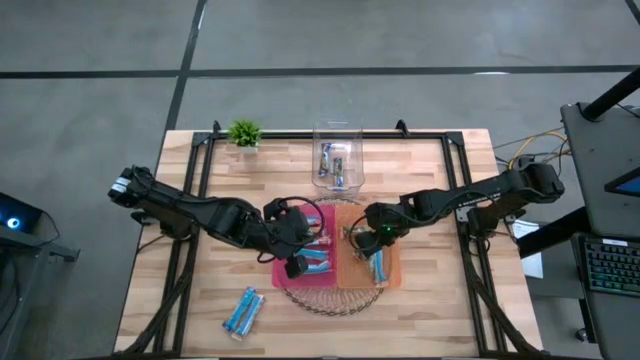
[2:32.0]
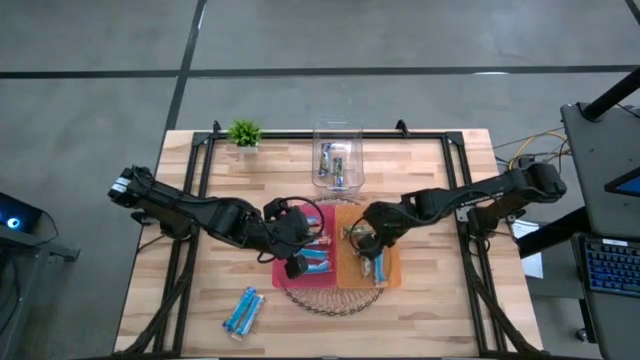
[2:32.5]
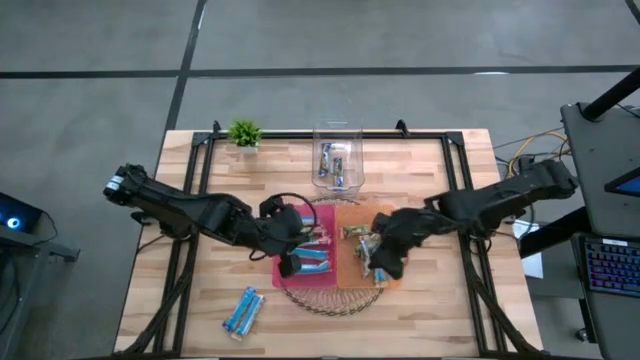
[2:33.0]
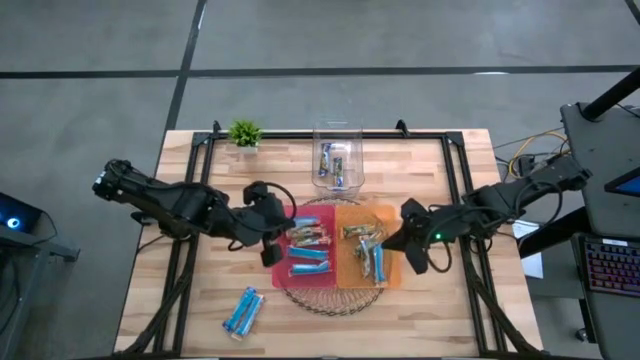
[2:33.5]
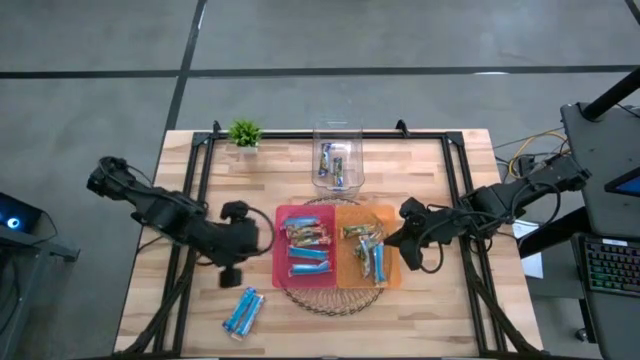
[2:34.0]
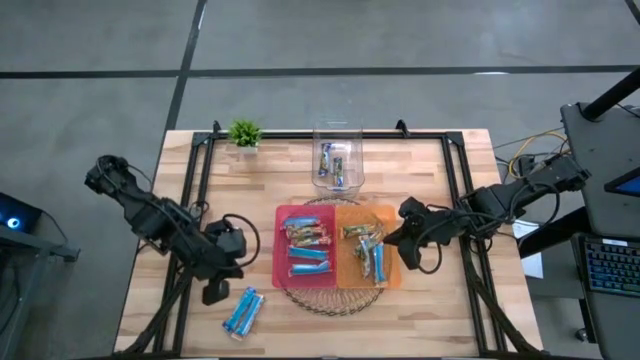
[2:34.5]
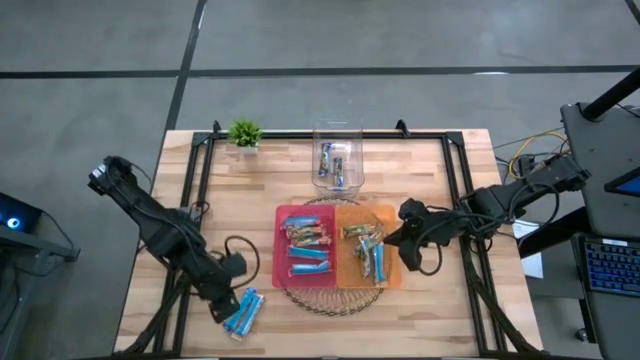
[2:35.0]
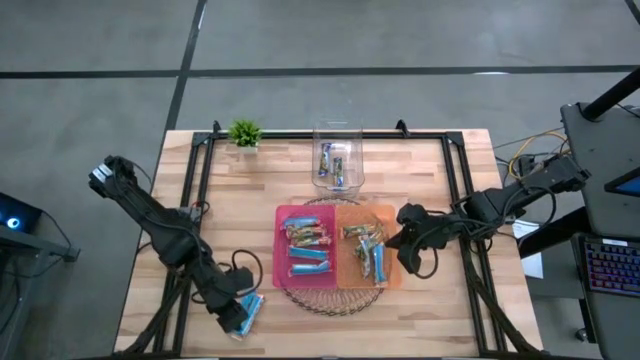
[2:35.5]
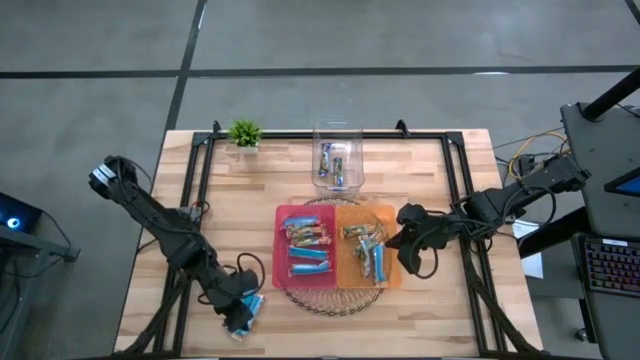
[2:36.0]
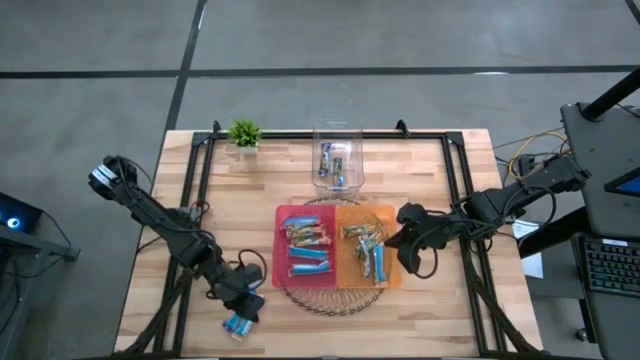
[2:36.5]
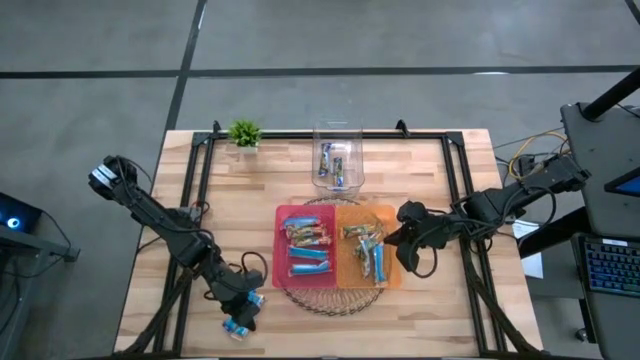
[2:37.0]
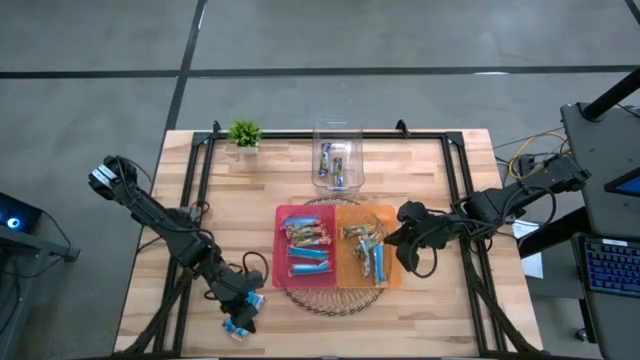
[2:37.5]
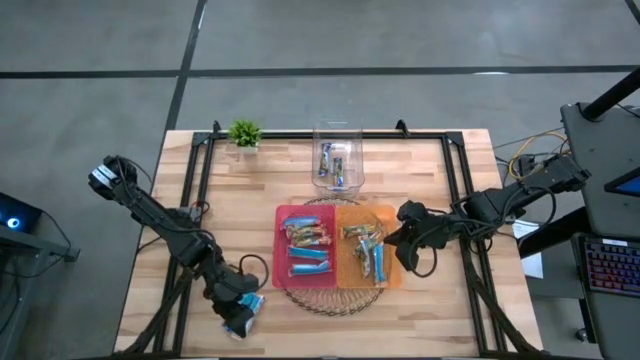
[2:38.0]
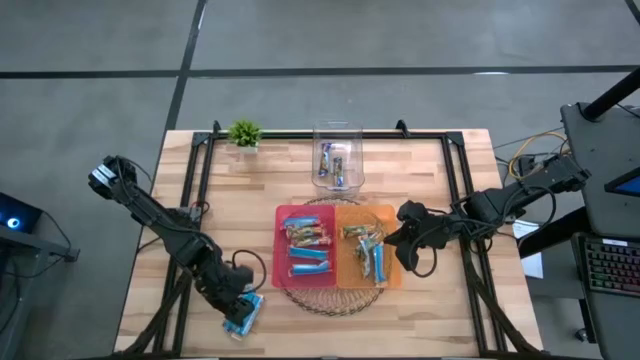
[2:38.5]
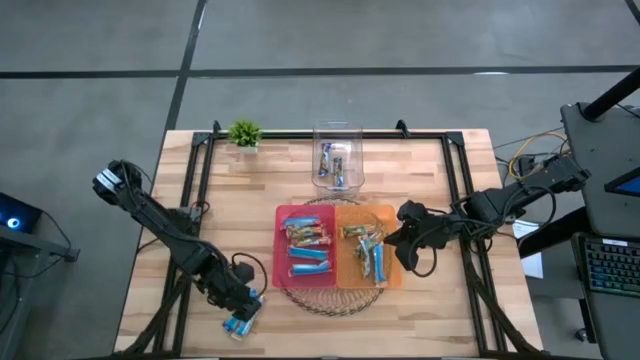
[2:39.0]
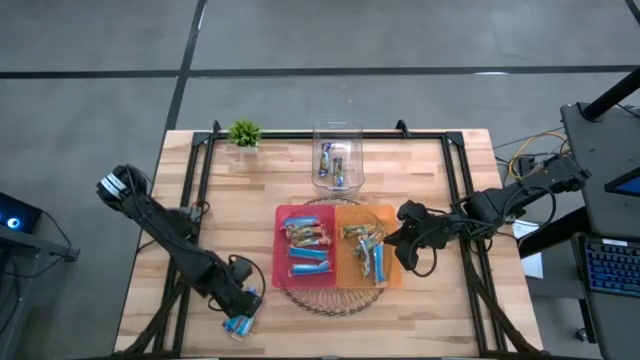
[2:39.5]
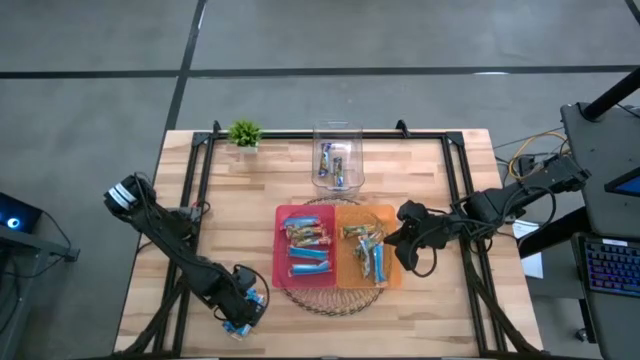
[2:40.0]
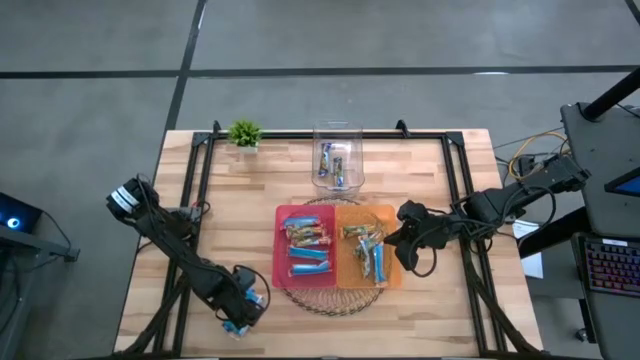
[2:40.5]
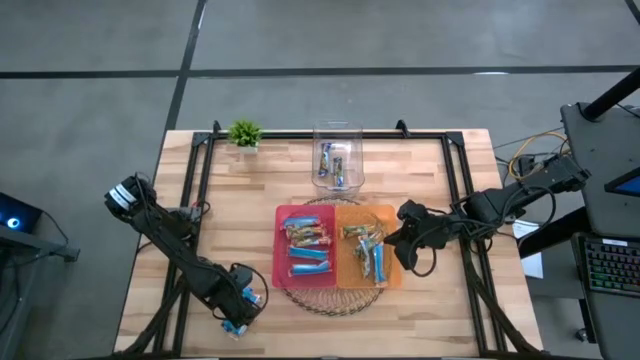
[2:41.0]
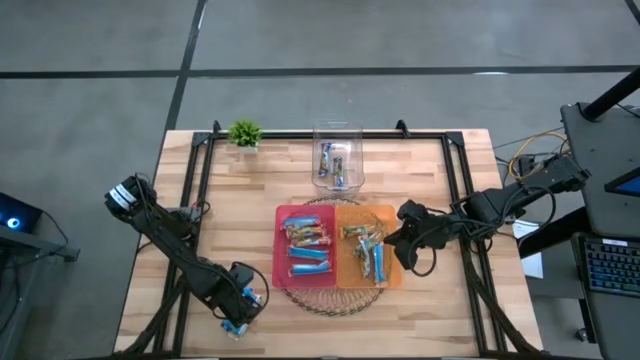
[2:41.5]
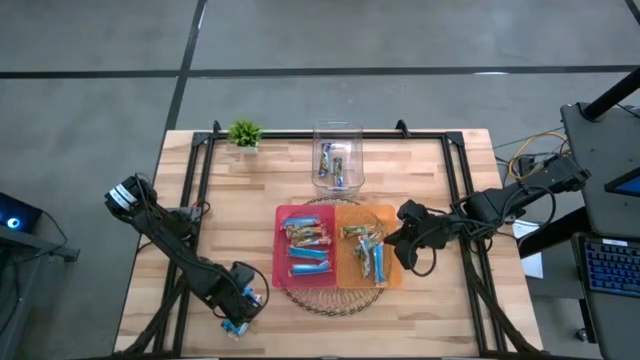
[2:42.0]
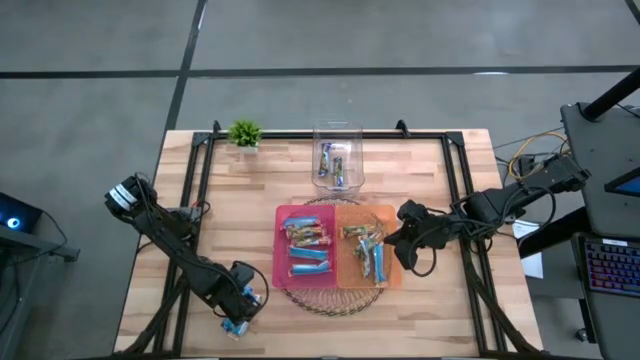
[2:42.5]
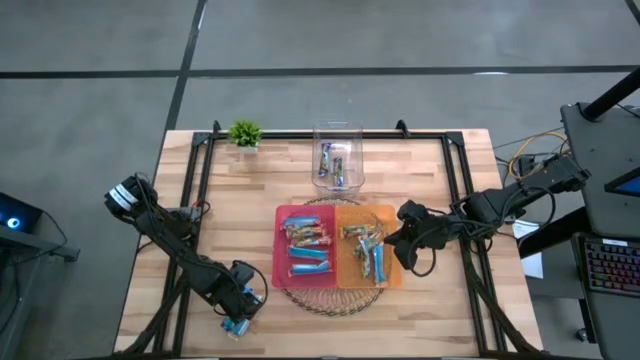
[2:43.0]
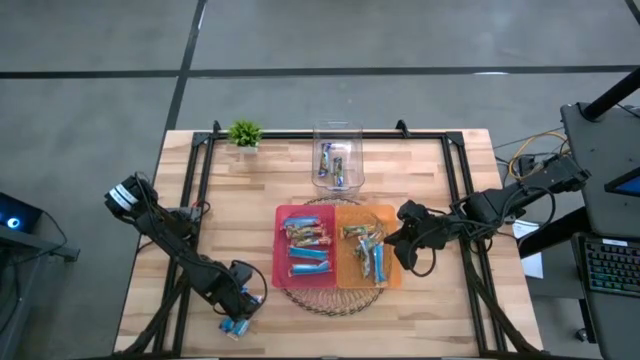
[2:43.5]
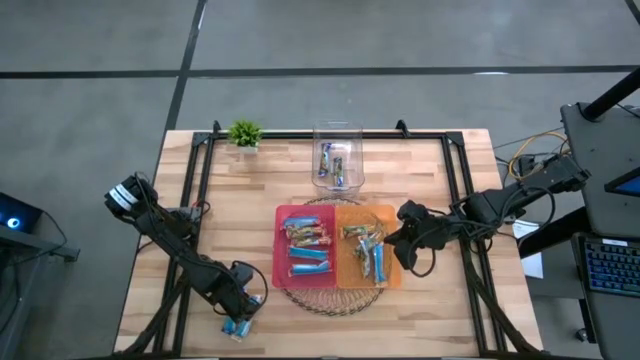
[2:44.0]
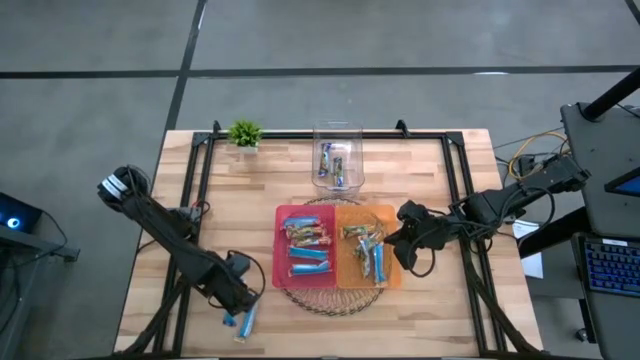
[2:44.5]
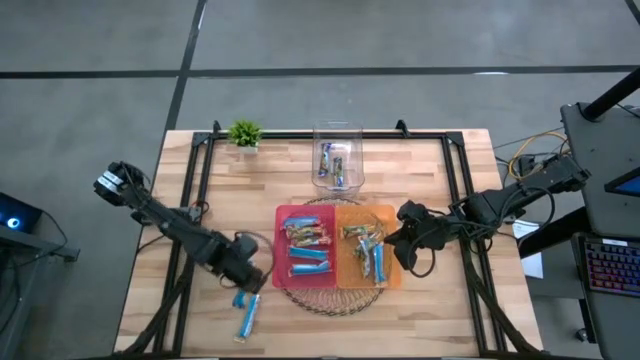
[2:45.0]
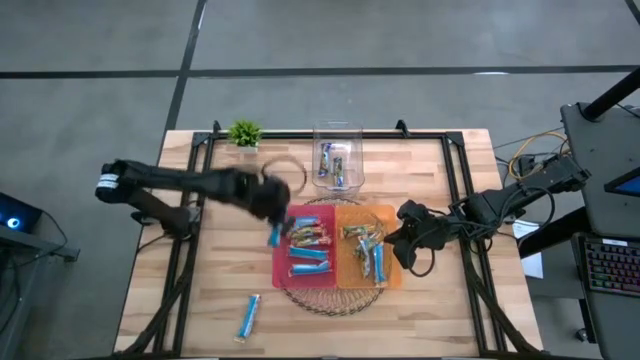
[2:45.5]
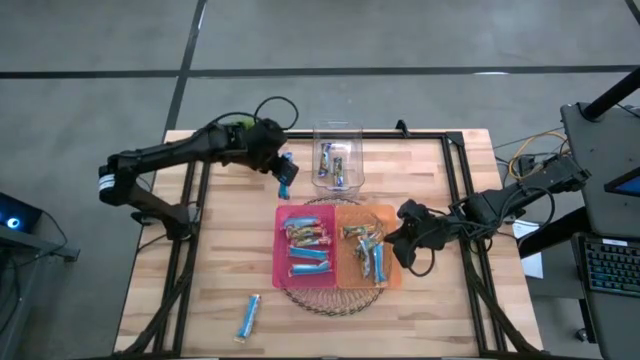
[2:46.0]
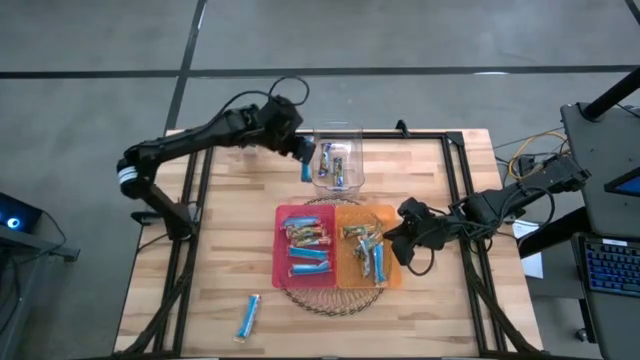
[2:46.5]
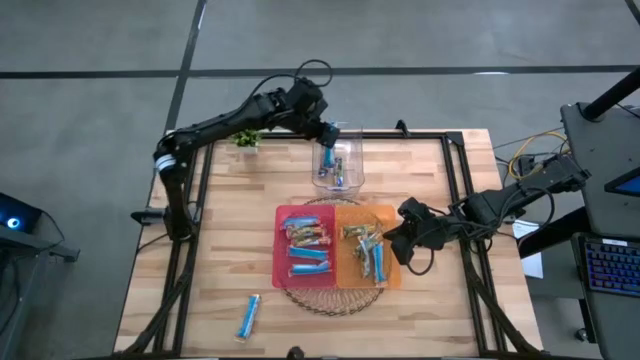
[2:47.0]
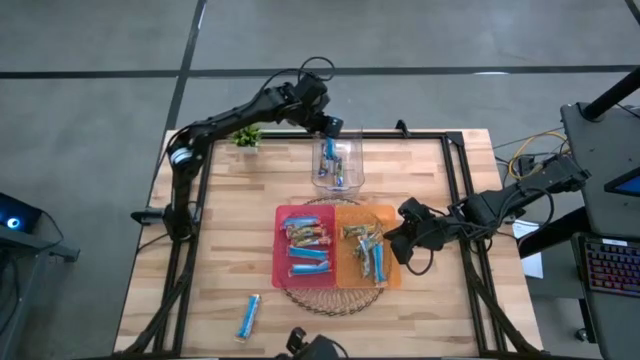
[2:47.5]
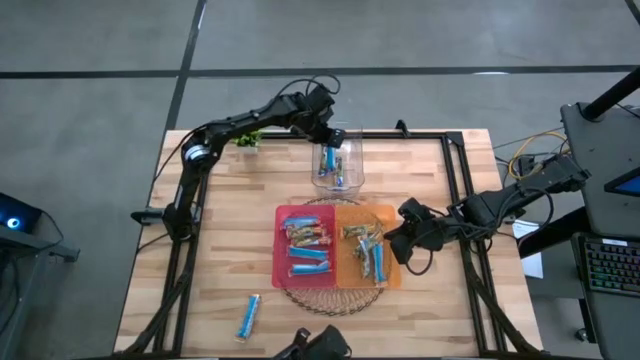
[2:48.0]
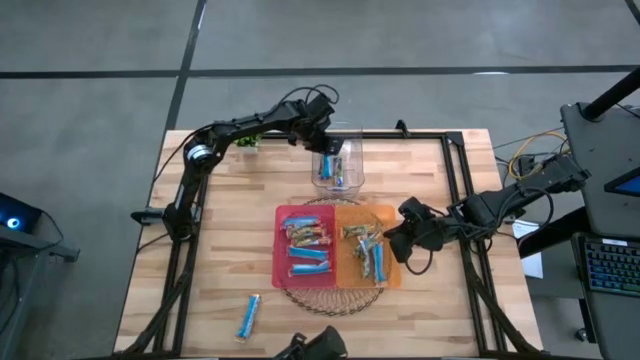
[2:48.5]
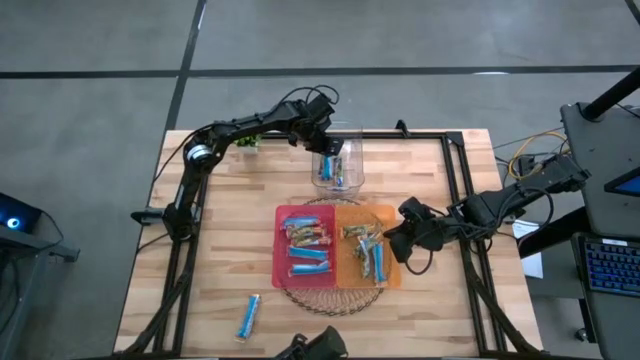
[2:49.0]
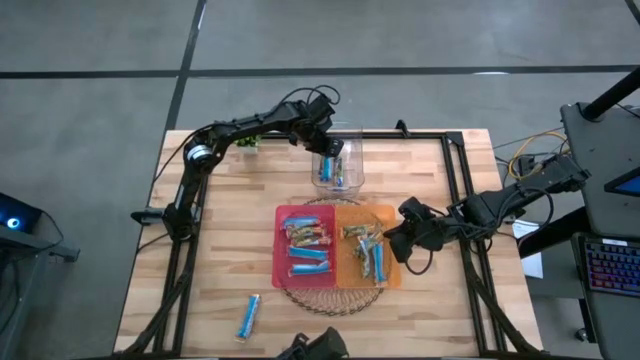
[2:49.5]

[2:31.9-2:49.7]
Task: Pick and place Granola Bars by type
Put the blue granola bar into the transparent bin

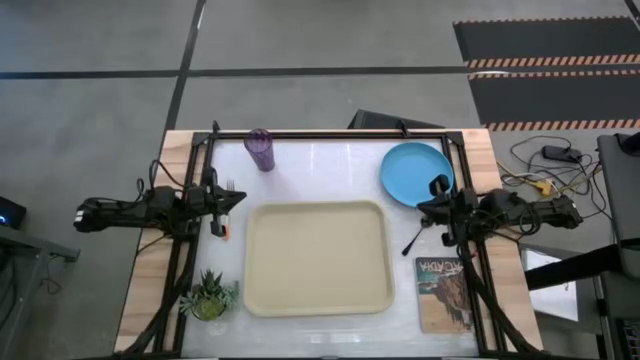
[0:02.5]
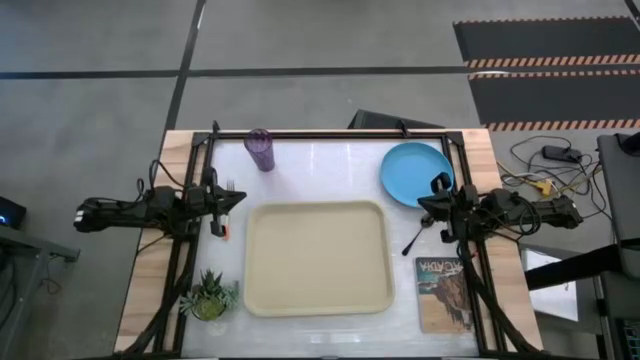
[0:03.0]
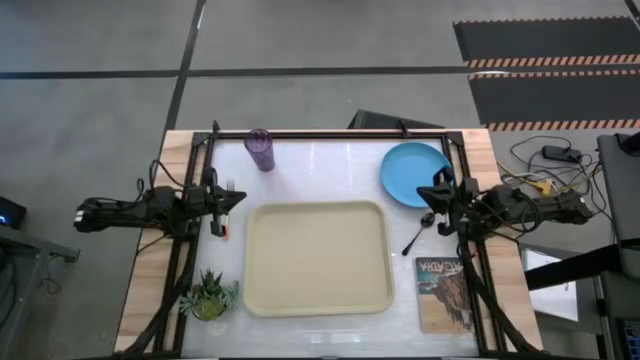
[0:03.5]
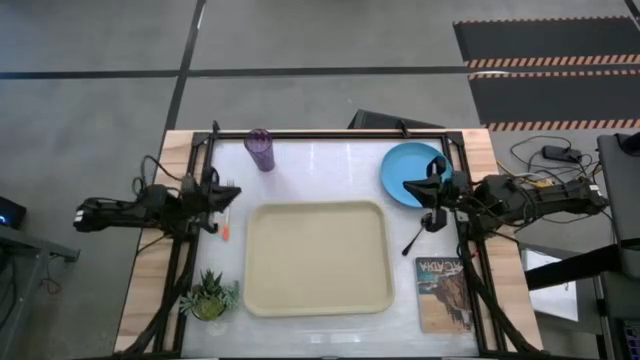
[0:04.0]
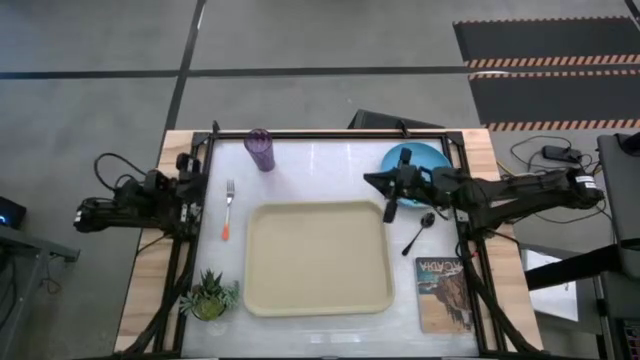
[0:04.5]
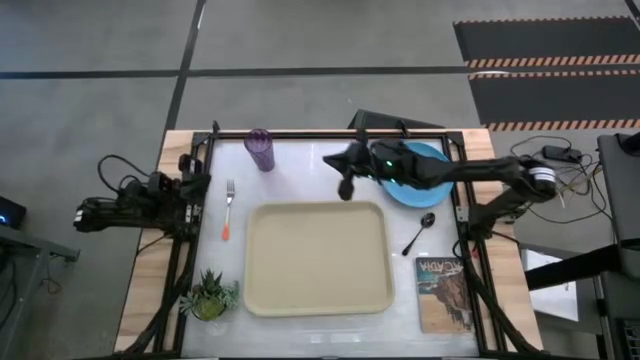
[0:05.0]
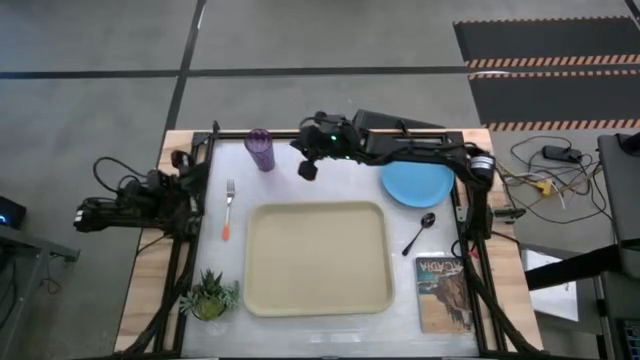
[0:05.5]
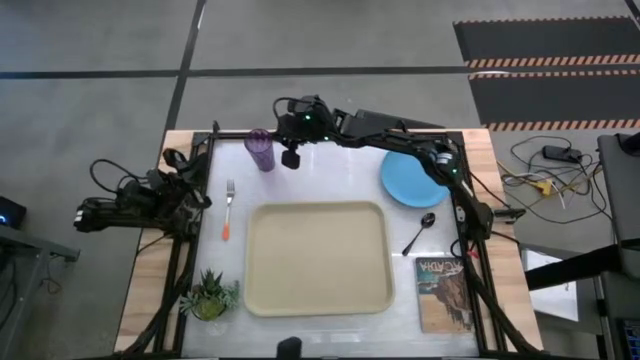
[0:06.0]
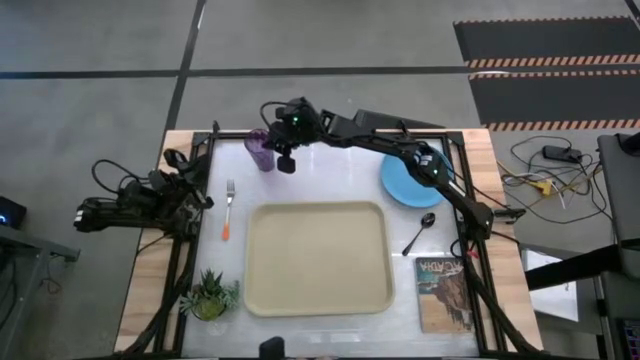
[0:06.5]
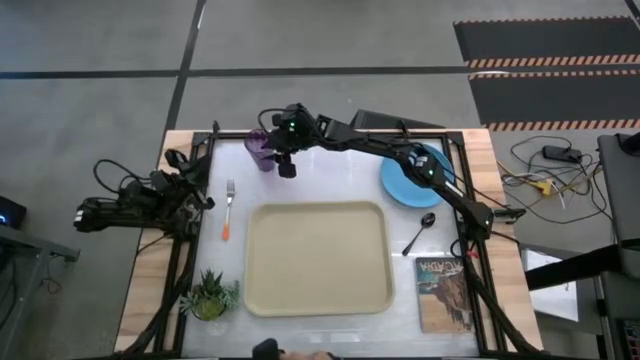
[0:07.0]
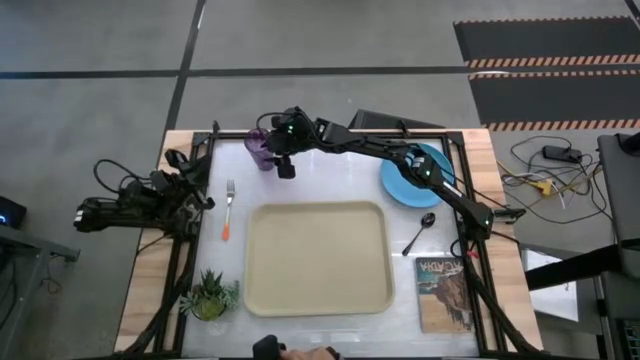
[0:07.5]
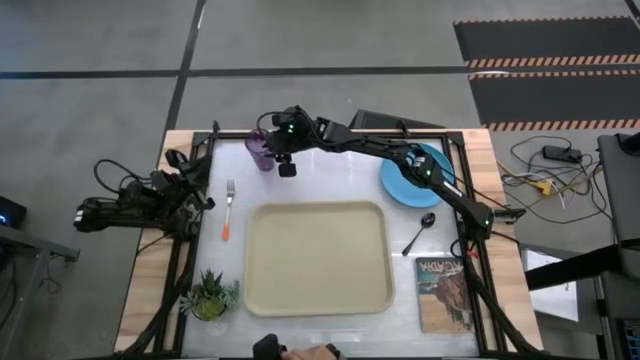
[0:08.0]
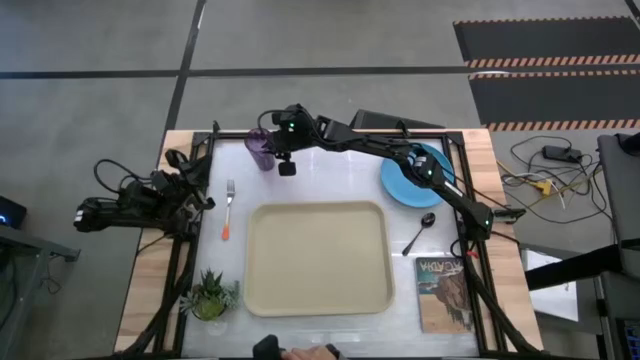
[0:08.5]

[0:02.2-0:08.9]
Task: Pick and place plate/cup/fork/spoon on tray
Put the violet cup on the top right of the white tray
